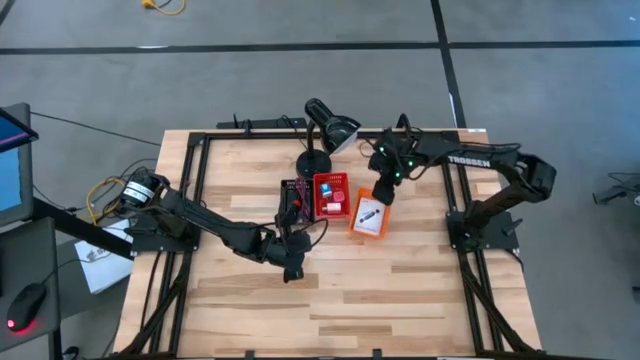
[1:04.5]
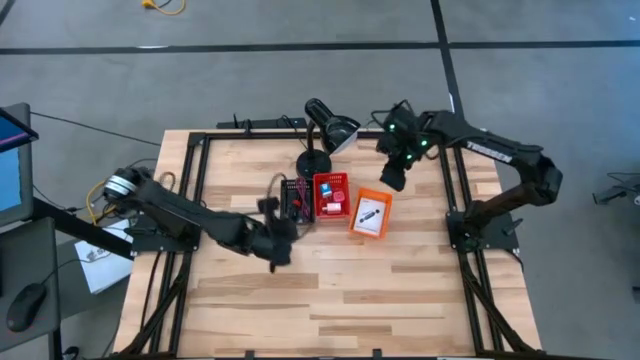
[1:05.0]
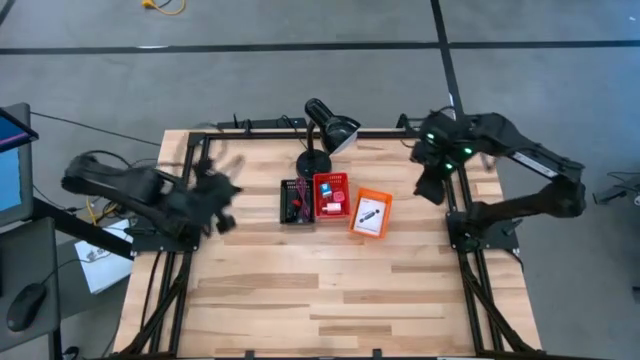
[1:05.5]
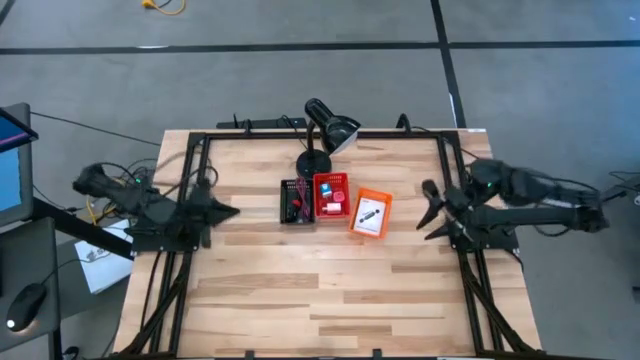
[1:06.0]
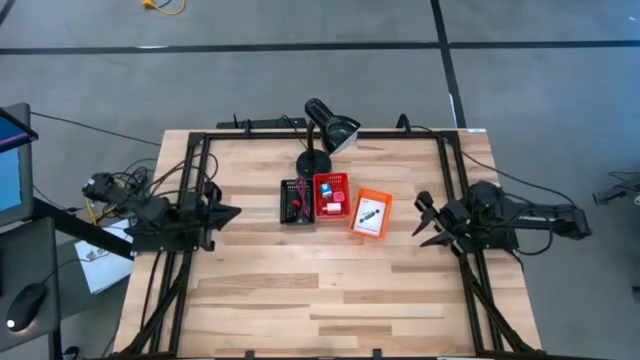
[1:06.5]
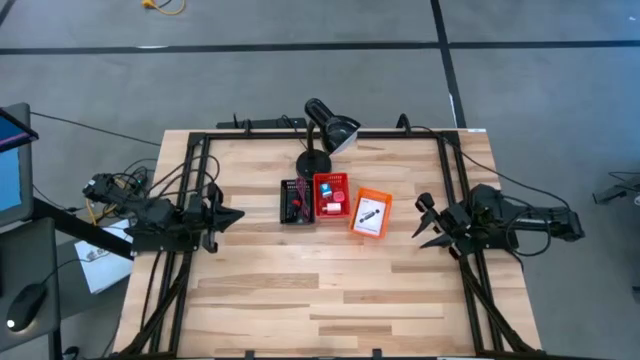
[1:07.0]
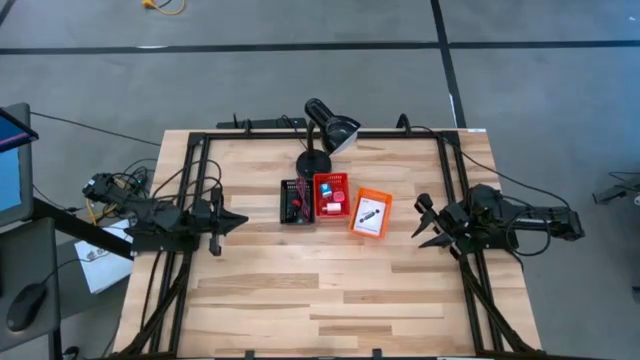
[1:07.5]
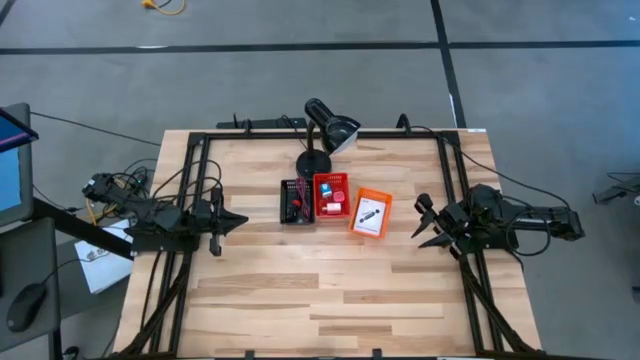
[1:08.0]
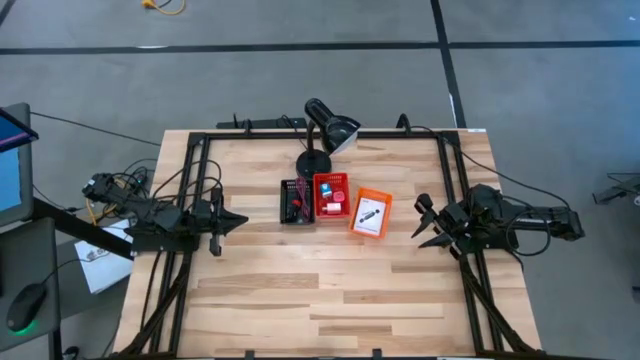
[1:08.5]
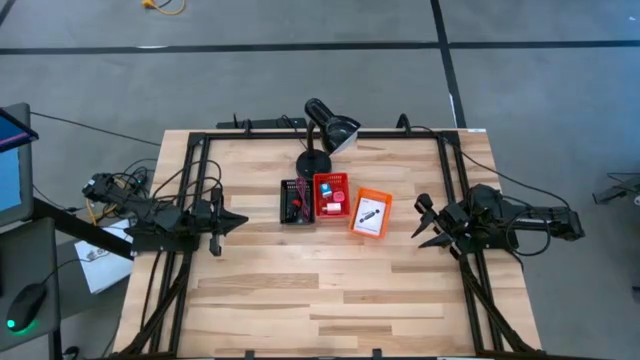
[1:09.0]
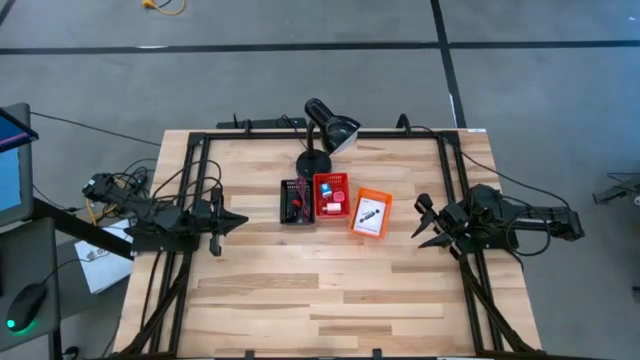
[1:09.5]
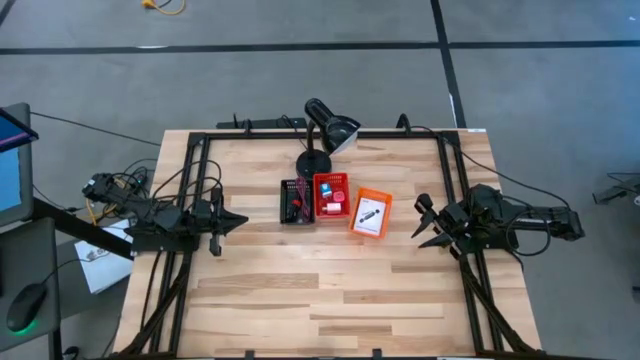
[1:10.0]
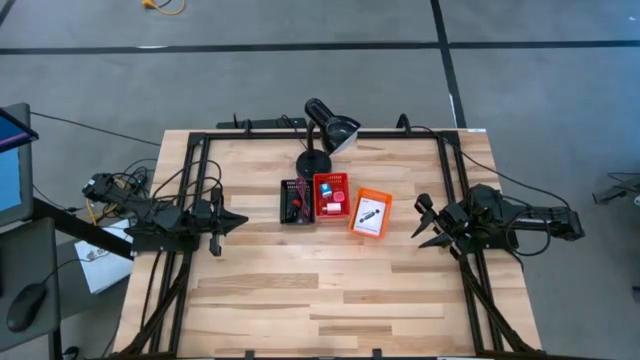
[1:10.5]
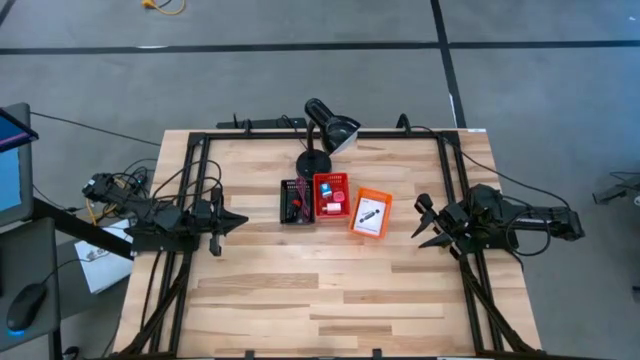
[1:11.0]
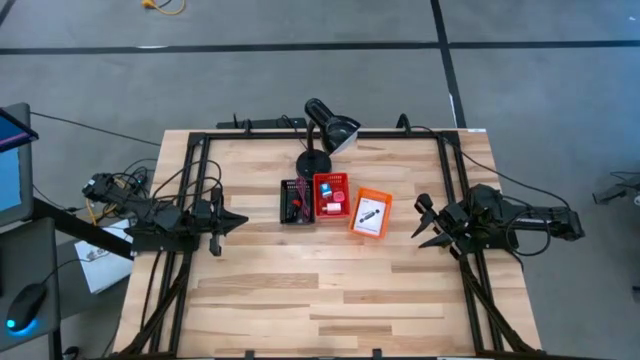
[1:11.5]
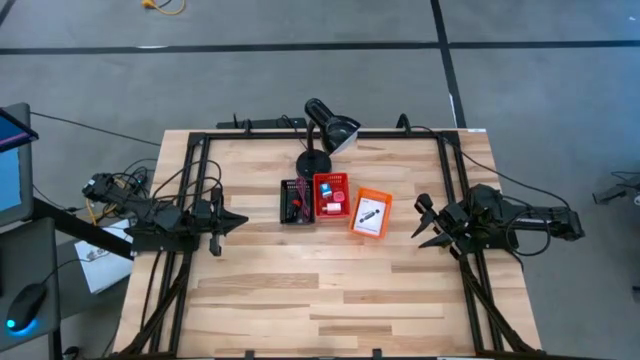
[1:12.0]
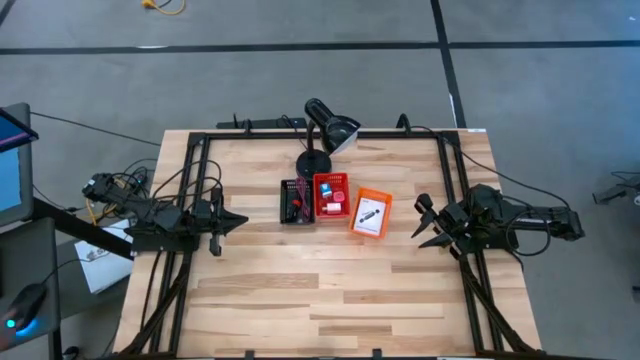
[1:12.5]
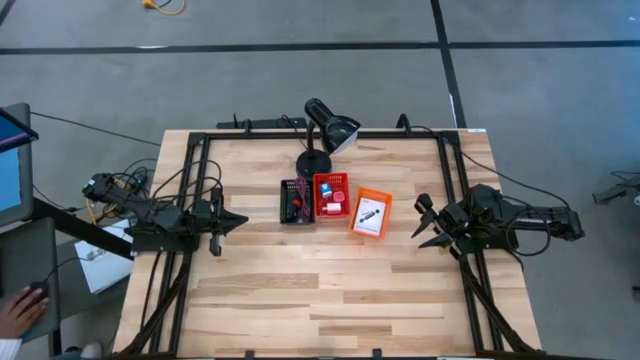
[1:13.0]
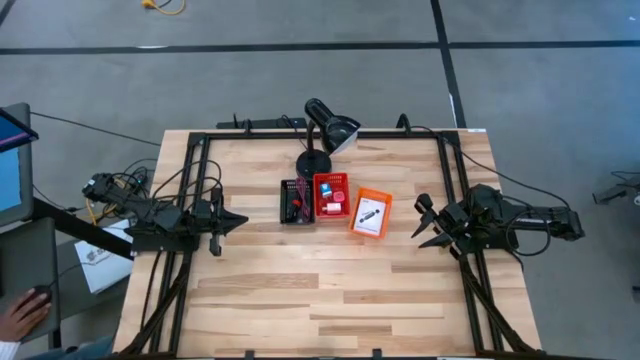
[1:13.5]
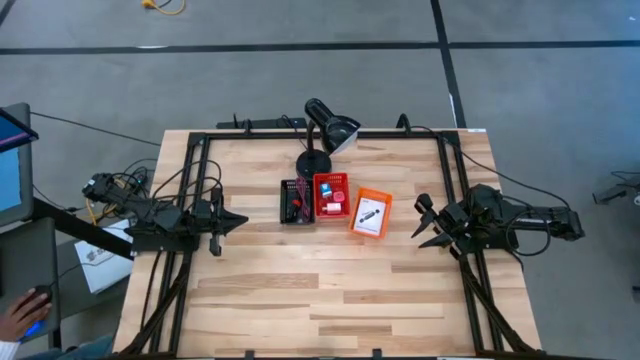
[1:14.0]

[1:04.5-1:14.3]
Task: Pick and place items into bin
Return to Home Position
